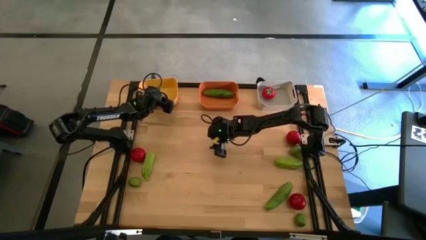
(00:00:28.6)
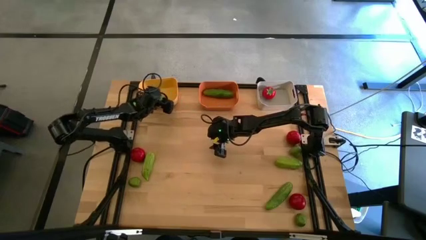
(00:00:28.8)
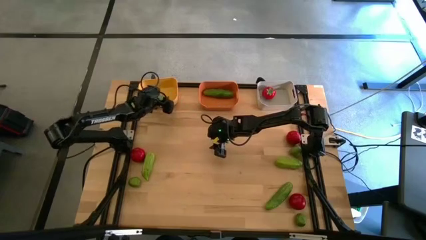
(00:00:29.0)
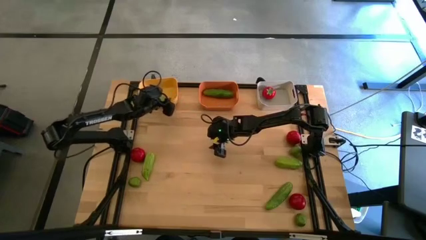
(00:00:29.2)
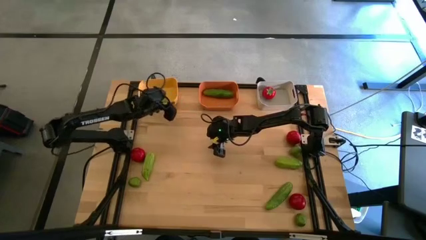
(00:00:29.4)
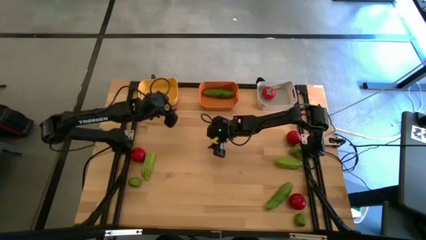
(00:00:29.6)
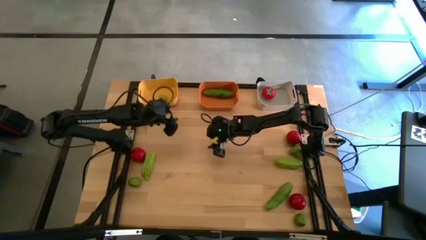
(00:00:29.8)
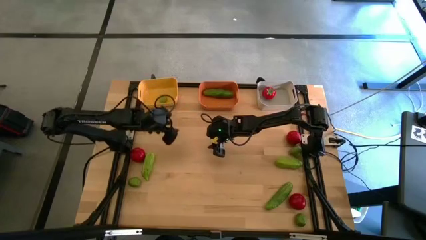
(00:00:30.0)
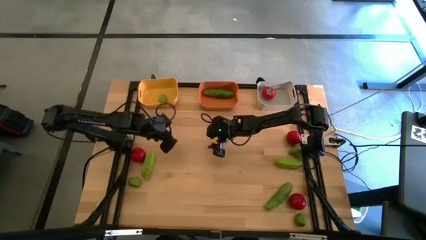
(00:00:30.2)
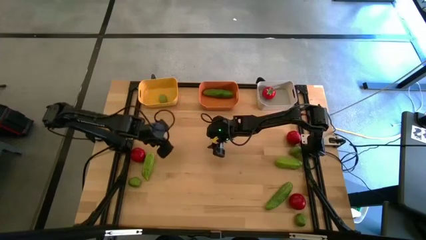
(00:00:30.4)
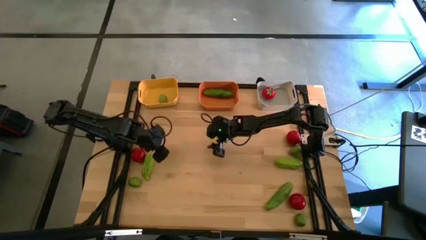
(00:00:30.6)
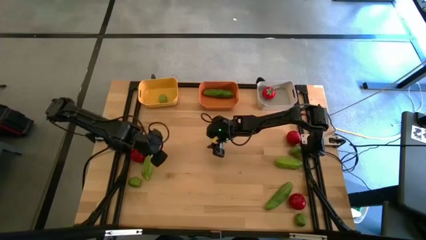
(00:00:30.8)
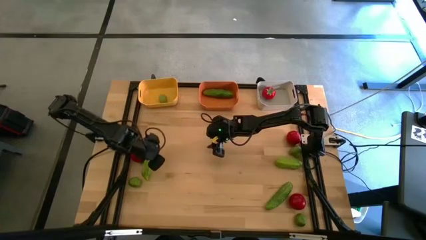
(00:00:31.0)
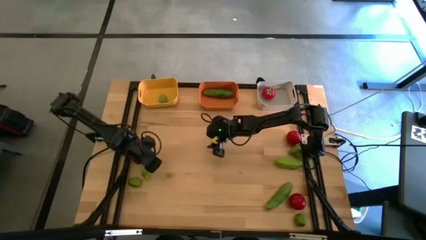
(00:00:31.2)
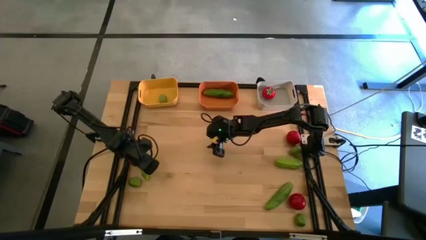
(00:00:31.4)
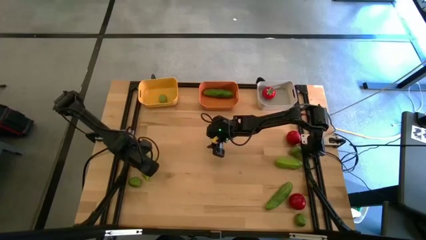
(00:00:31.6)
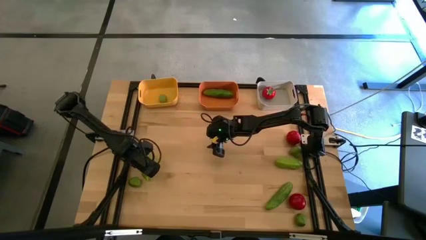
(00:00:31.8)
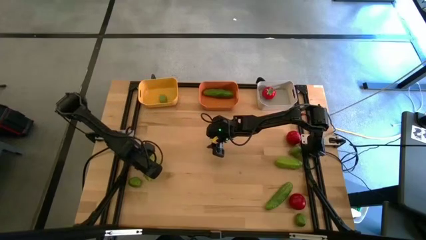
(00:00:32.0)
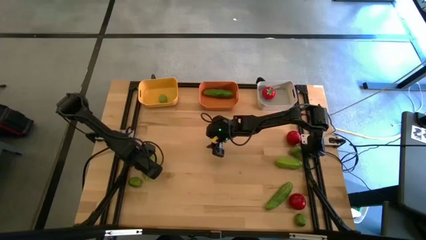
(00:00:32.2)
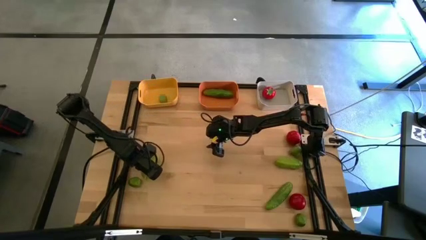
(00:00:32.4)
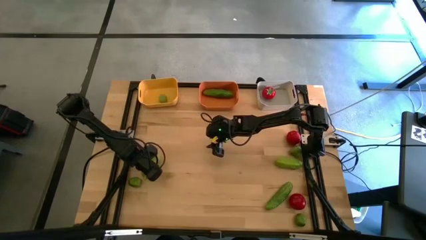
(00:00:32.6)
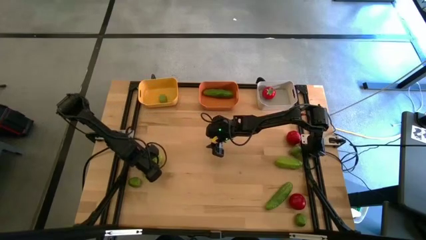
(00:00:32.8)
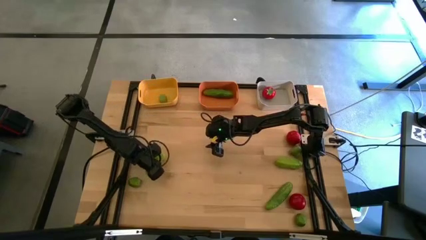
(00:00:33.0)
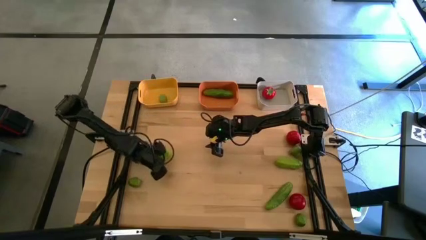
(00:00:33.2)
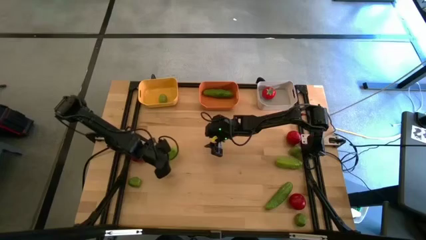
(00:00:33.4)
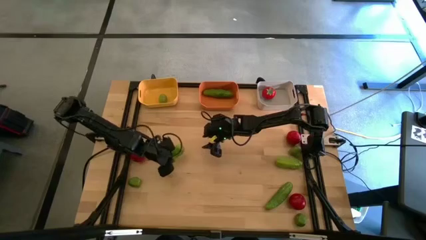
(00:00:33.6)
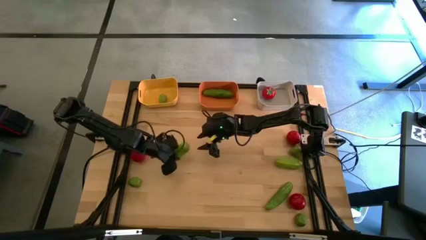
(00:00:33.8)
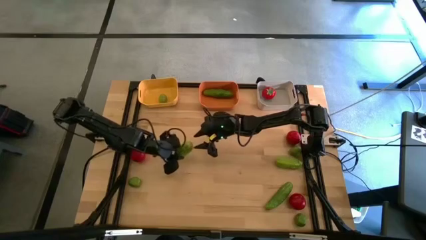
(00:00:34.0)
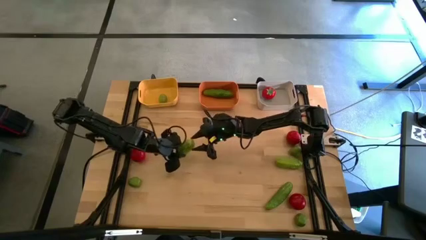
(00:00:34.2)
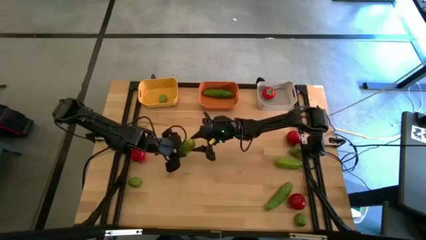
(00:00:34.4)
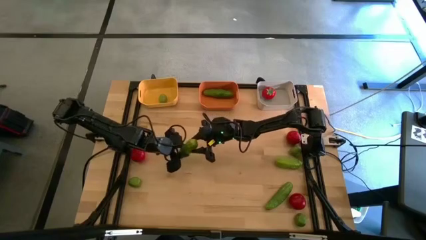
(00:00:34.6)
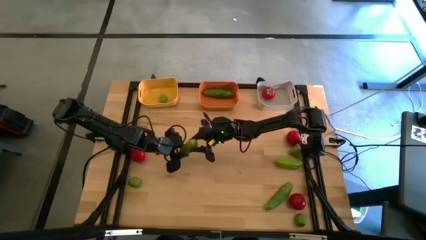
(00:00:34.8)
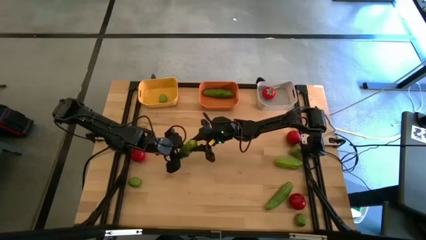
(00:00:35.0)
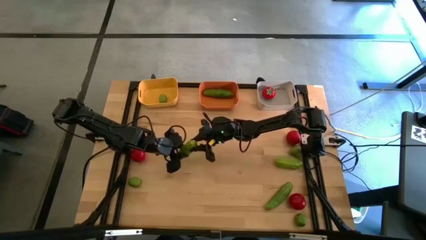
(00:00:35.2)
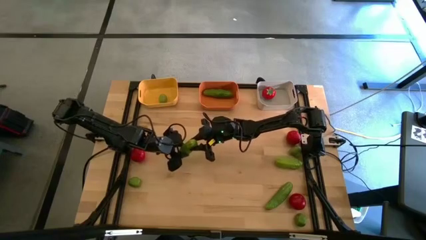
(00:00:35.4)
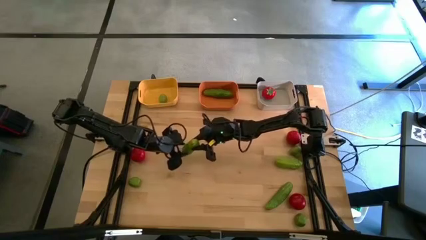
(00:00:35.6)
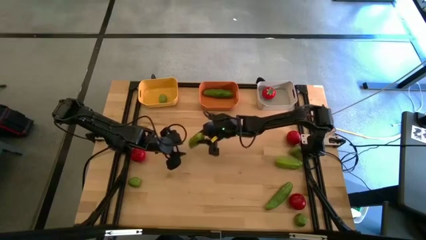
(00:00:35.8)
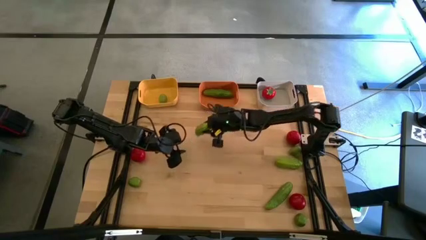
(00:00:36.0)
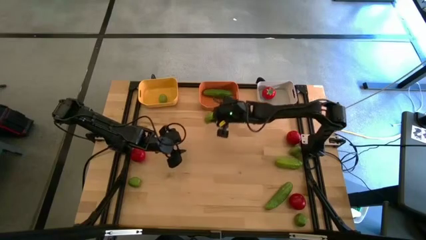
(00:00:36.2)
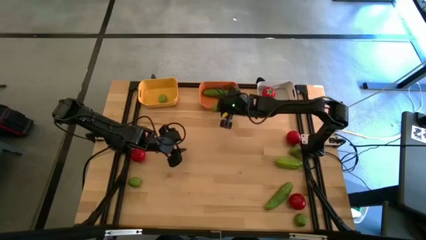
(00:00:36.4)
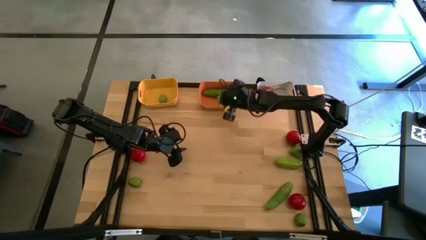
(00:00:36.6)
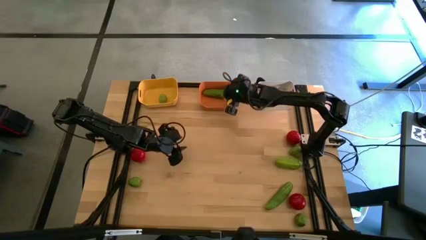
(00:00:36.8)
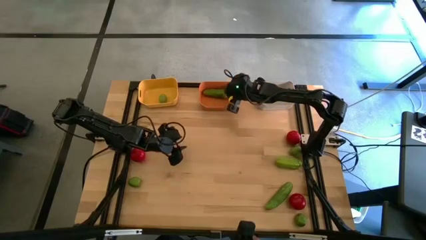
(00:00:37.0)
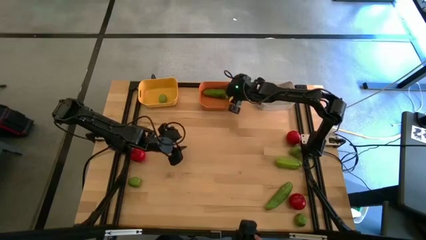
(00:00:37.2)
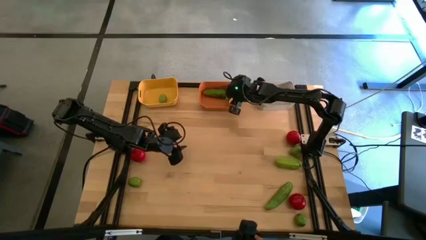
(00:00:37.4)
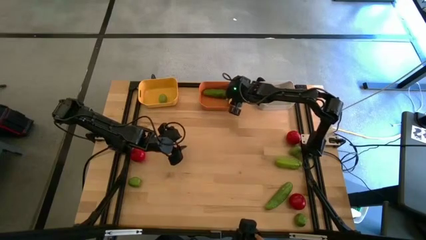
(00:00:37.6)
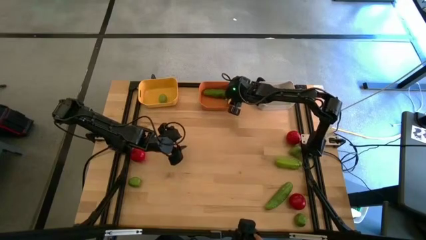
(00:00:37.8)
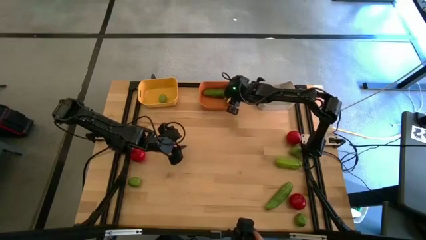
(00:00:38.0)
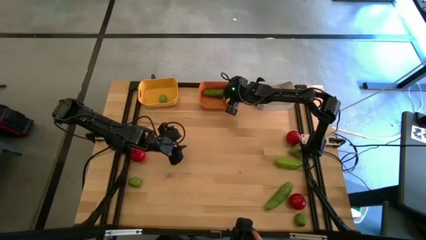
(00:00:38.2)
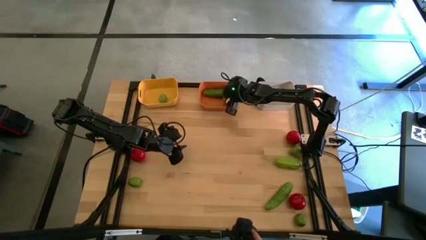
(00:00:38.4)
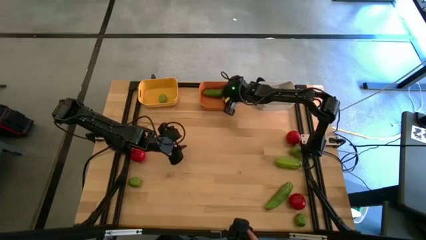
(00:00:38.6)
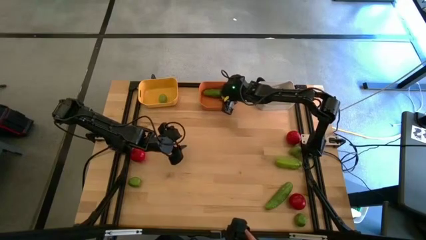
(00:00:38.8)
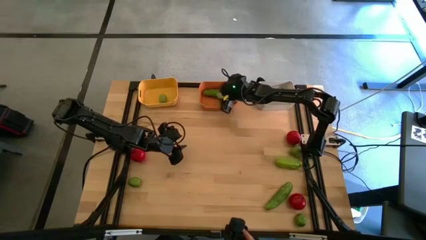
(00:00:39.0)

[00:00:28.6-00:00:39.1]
Task: Sort produce into baskets
Put the cucumber into the orange bin
